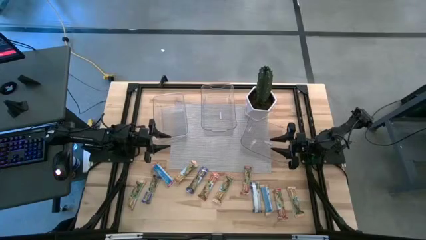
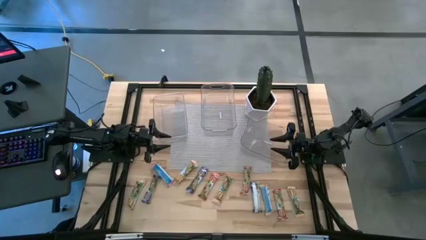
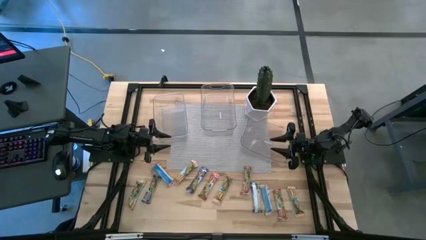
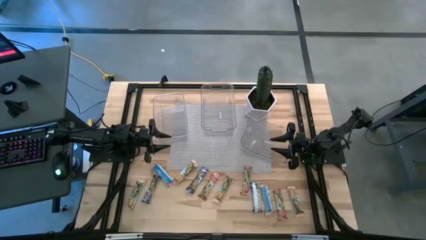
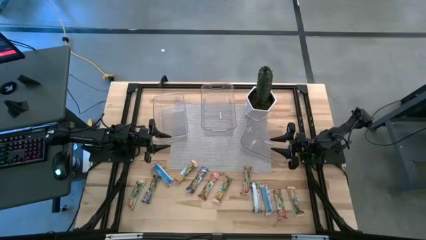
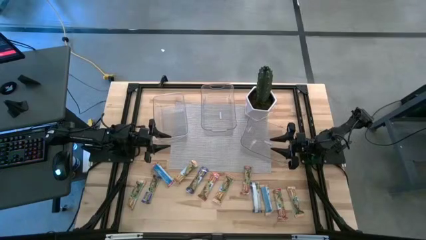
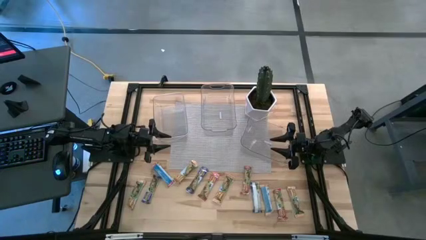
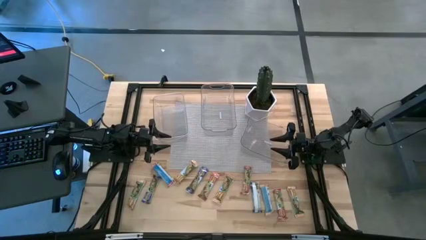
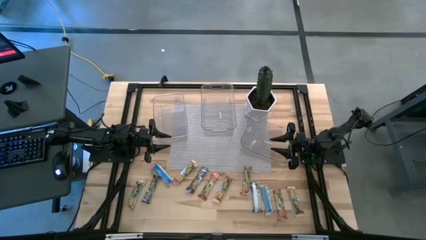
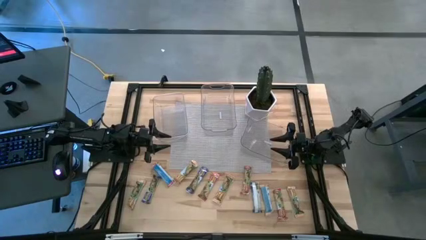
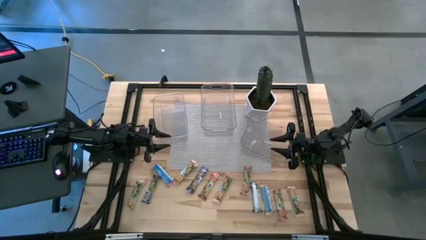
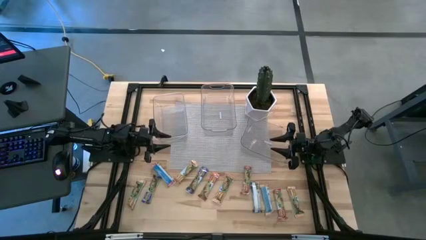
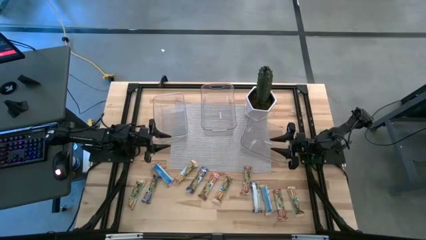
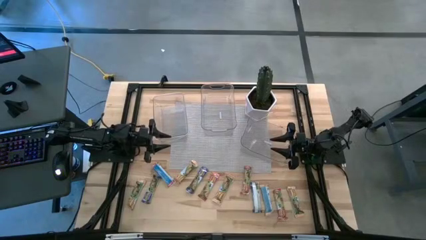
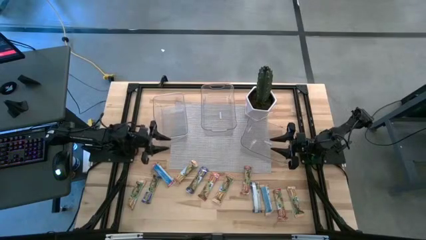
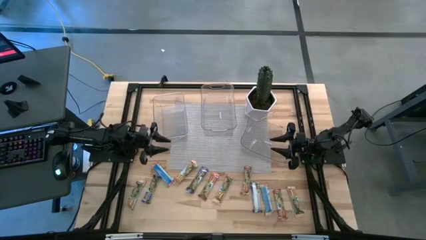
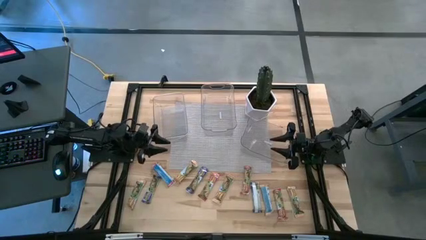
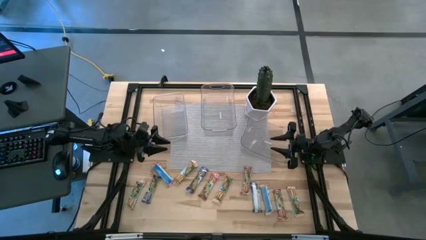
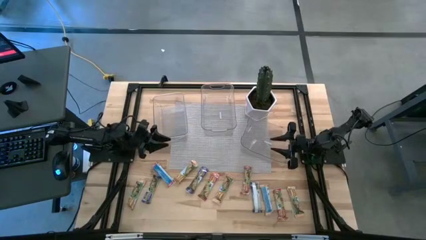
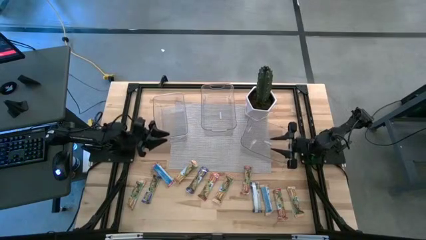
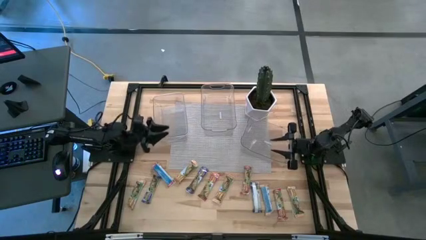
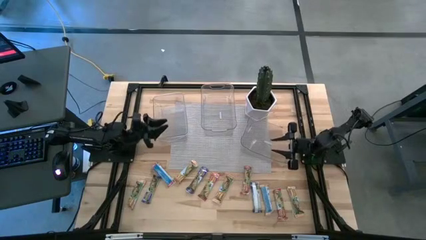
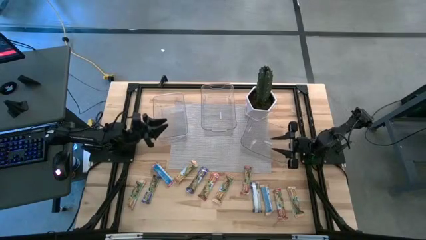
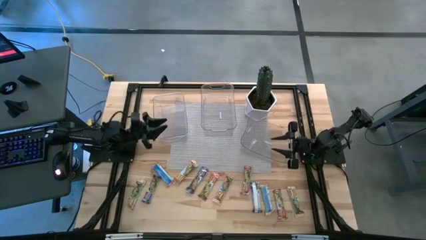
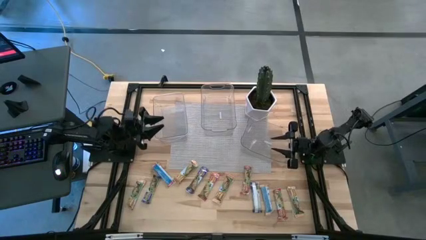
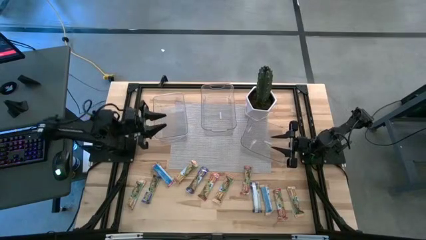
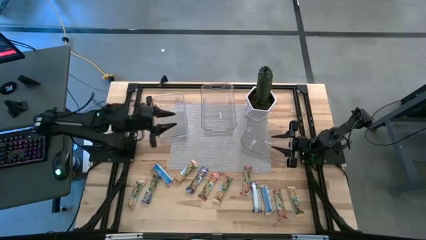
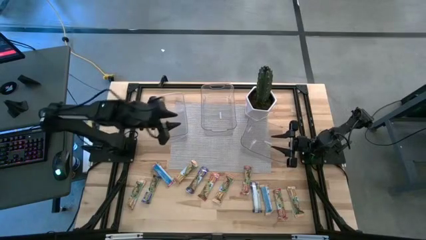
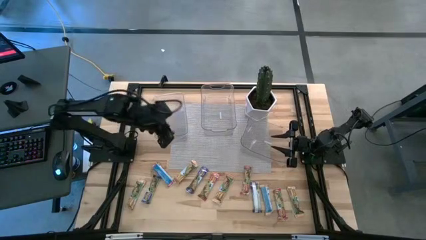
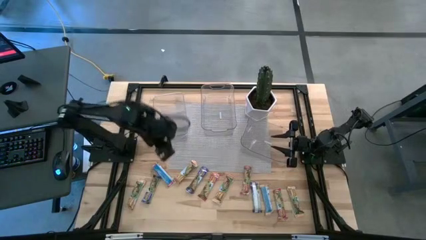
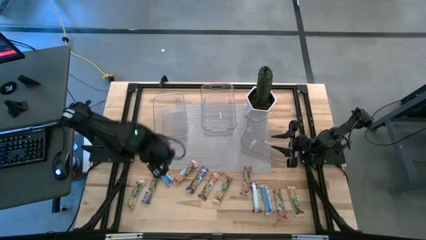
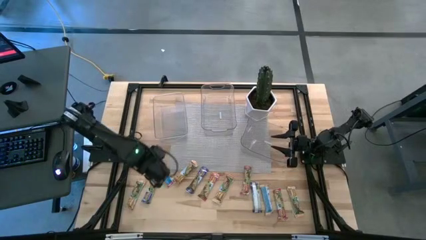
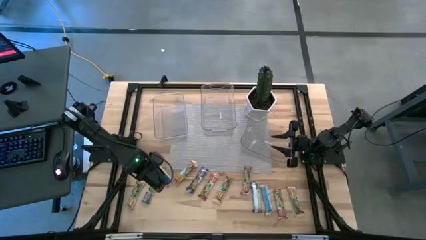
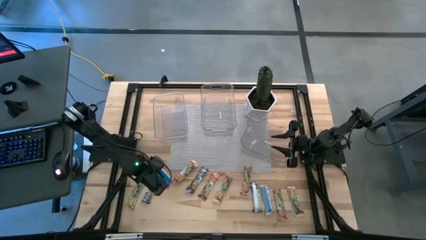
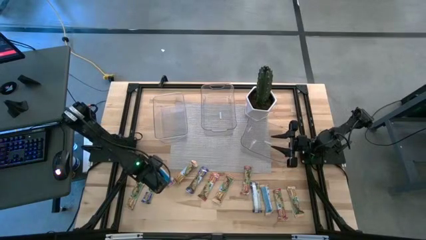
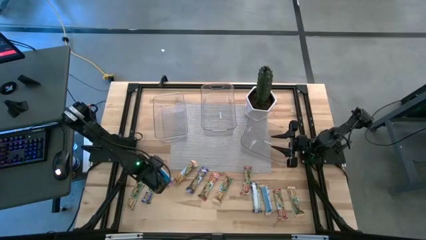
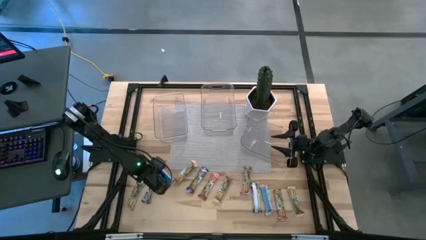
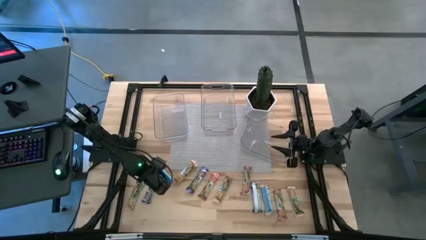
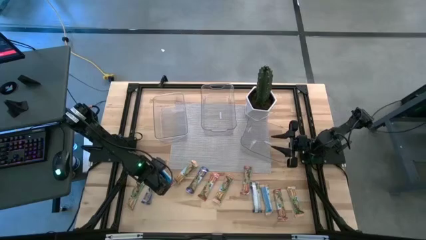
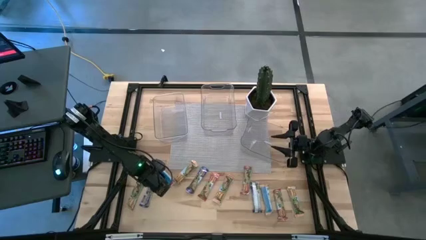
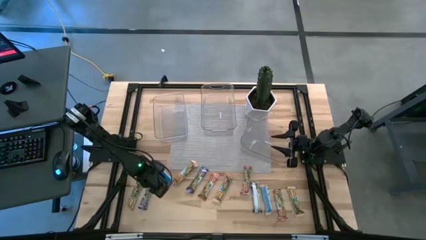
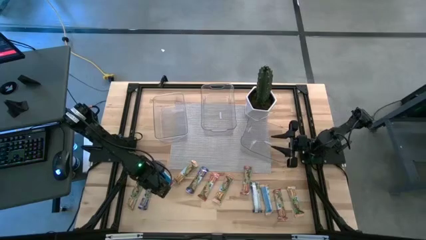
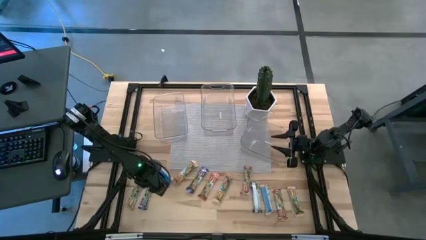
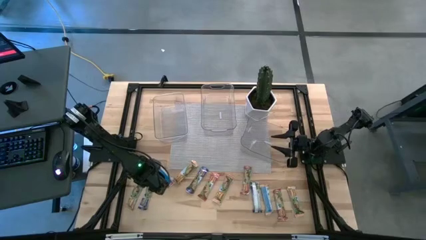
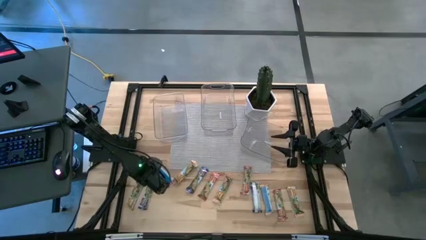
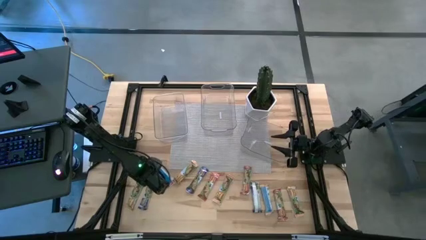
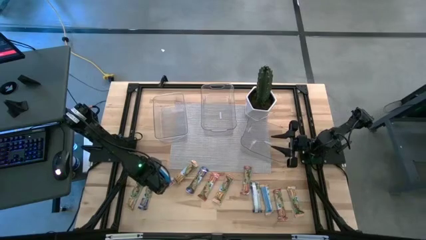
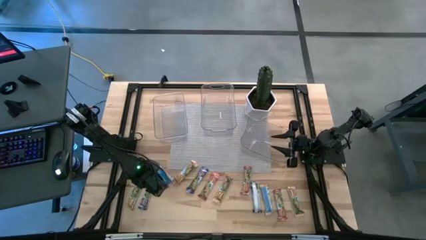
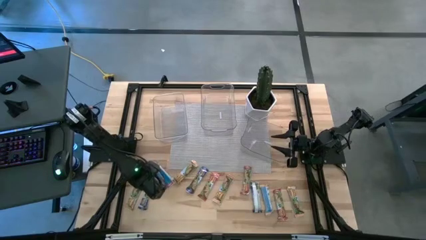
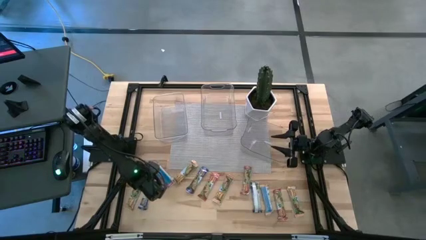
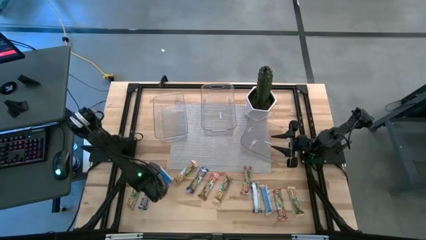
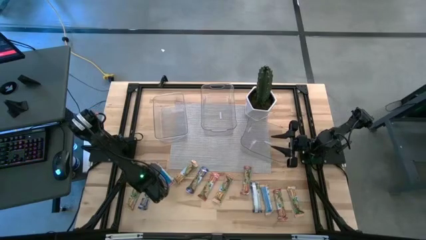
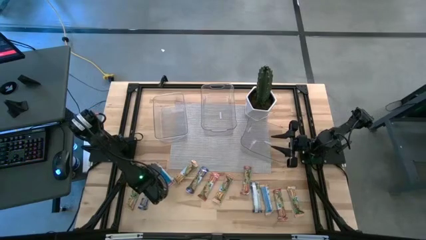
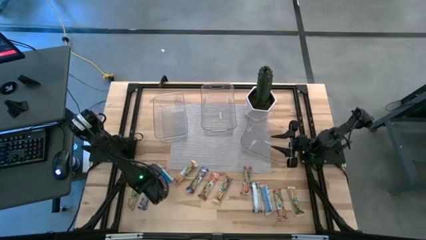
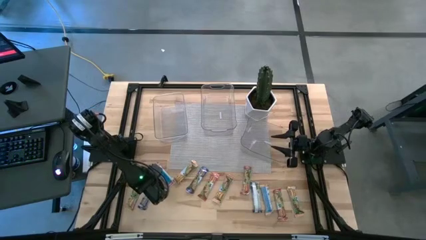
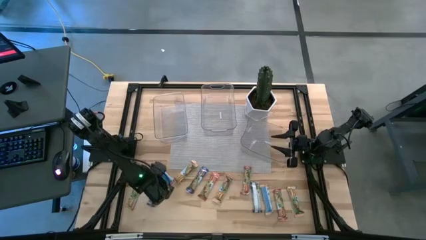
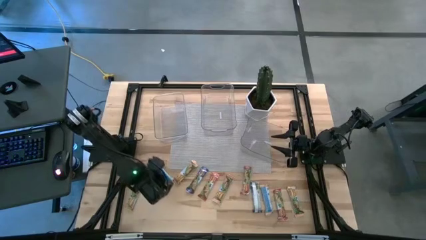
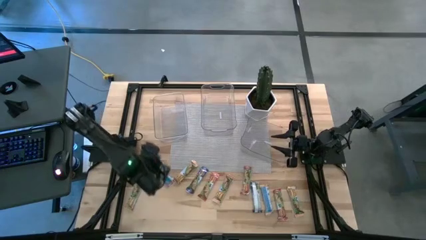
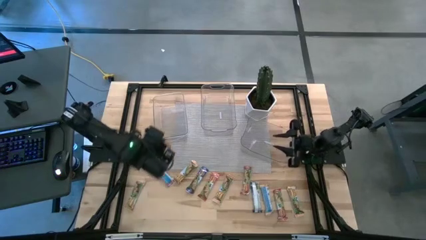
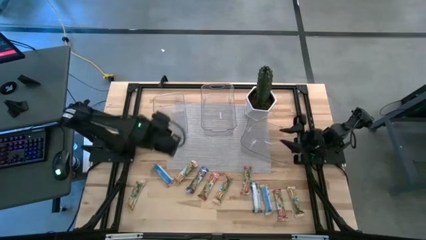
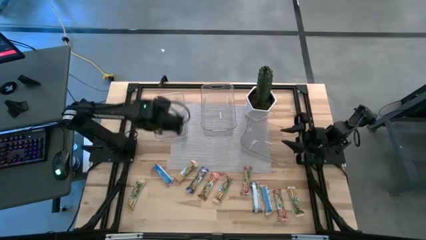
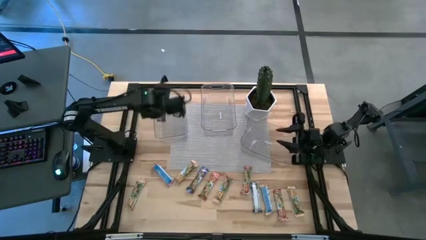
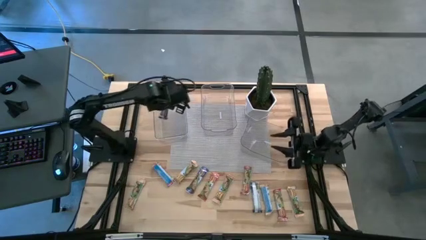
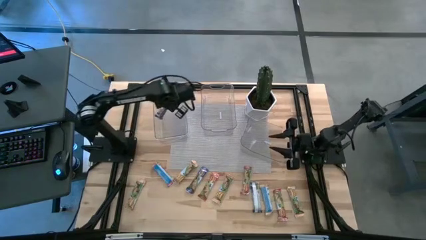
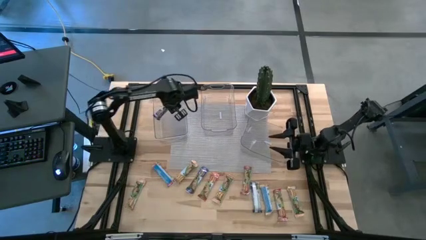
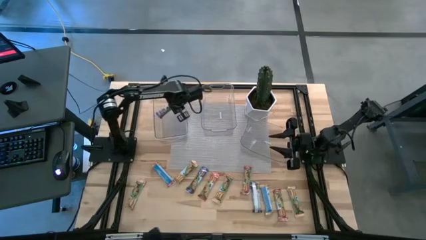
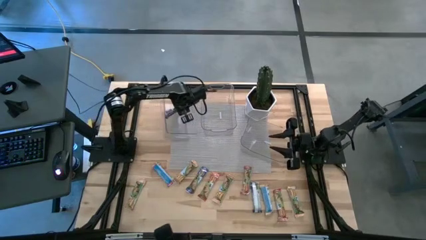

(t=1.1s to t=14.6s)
Task: Pick and place Granola Bars by type
Put the blue granola bar into the left bin
